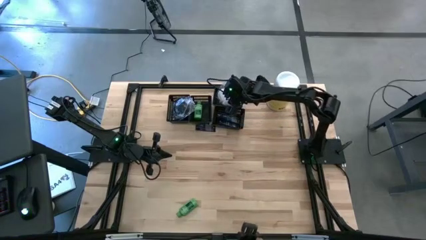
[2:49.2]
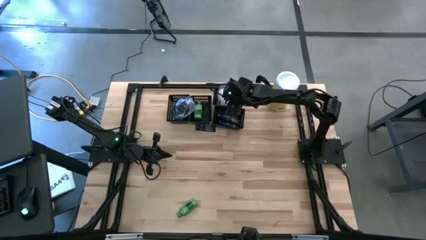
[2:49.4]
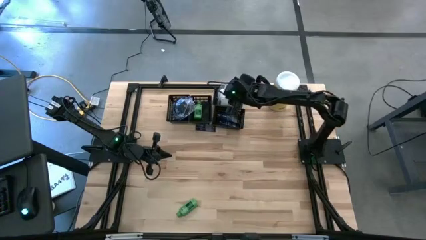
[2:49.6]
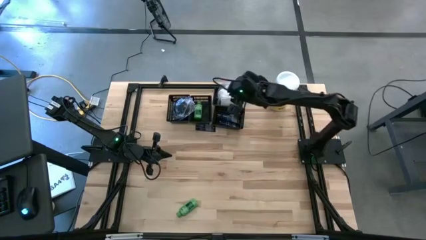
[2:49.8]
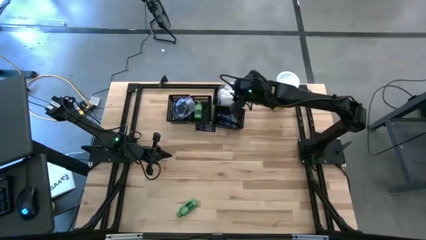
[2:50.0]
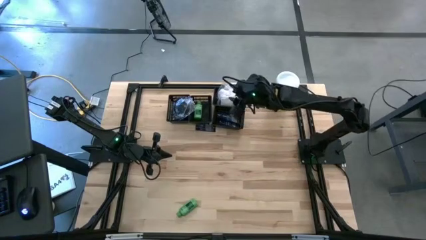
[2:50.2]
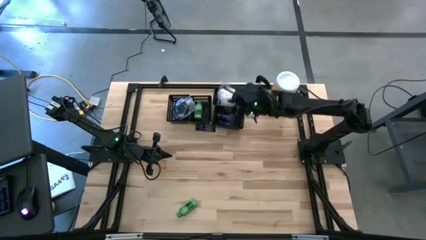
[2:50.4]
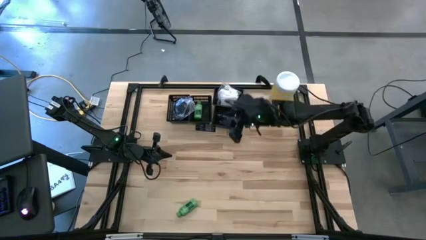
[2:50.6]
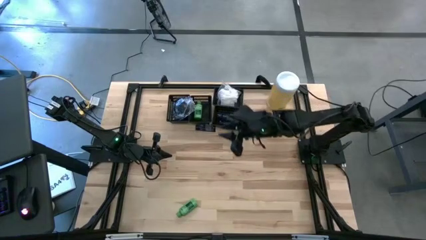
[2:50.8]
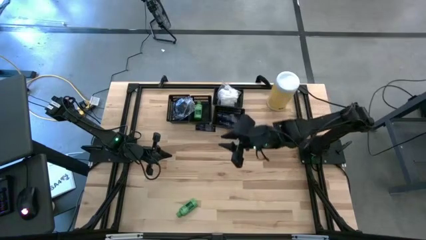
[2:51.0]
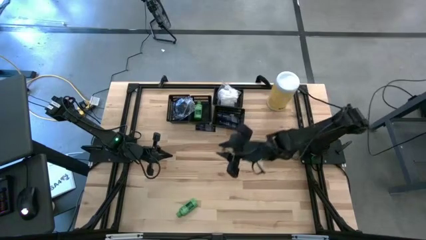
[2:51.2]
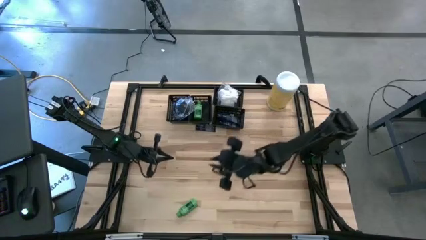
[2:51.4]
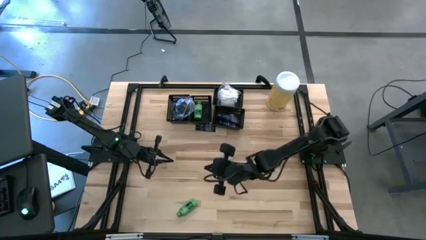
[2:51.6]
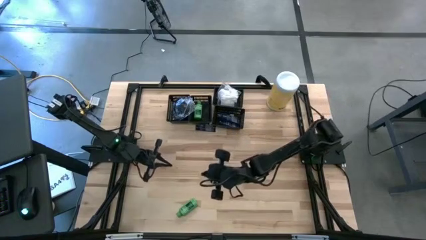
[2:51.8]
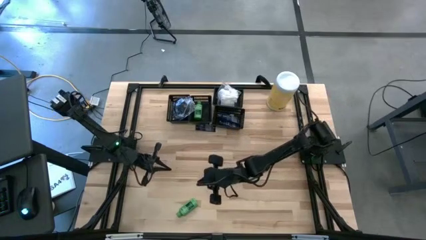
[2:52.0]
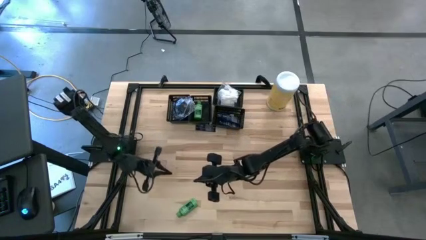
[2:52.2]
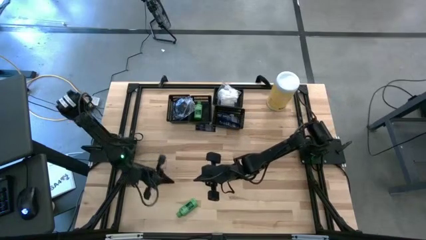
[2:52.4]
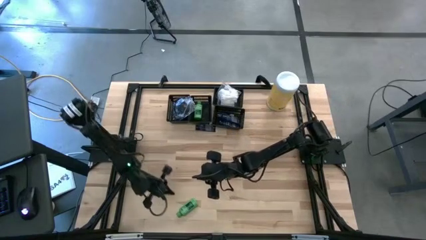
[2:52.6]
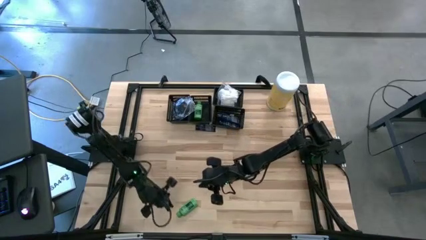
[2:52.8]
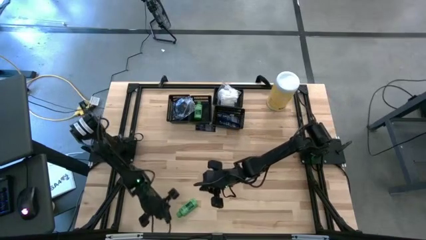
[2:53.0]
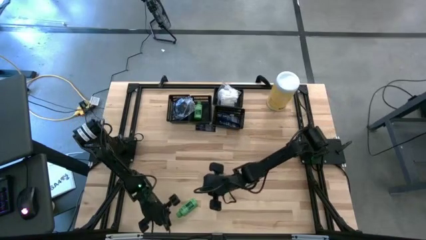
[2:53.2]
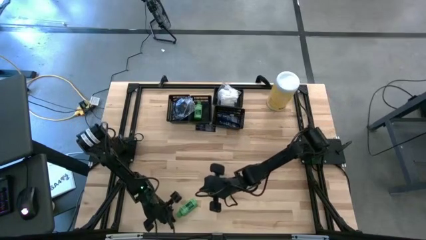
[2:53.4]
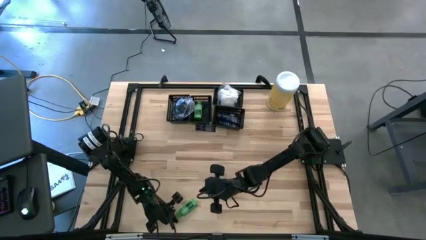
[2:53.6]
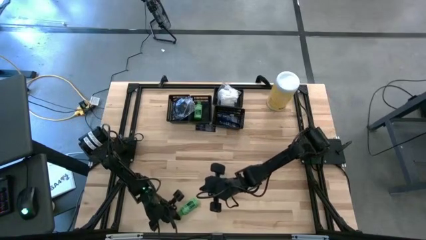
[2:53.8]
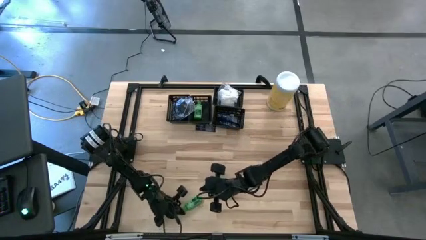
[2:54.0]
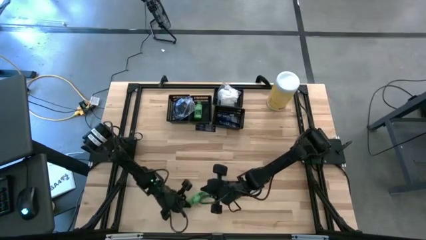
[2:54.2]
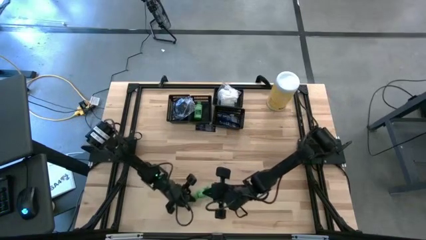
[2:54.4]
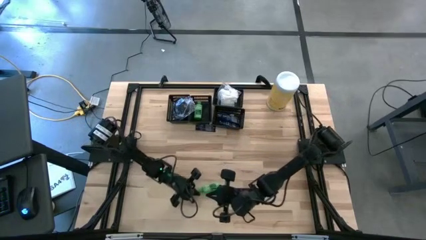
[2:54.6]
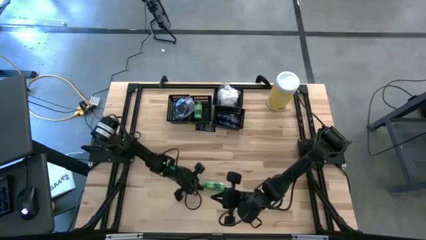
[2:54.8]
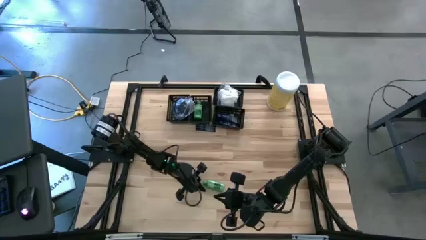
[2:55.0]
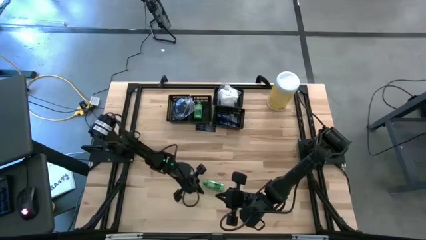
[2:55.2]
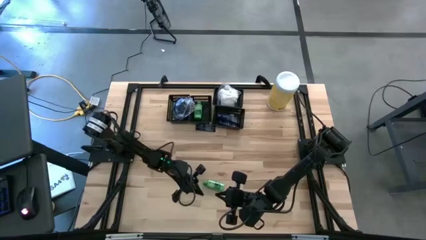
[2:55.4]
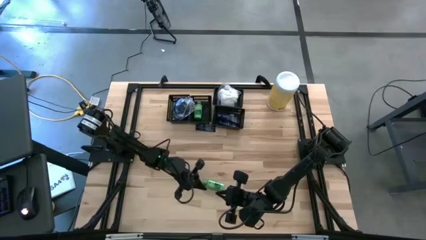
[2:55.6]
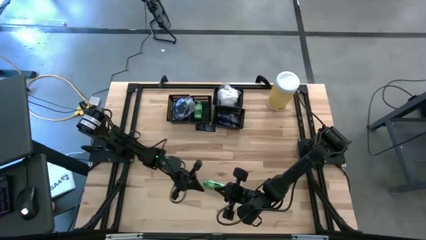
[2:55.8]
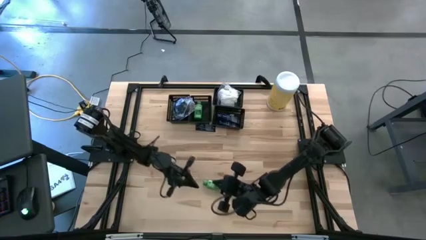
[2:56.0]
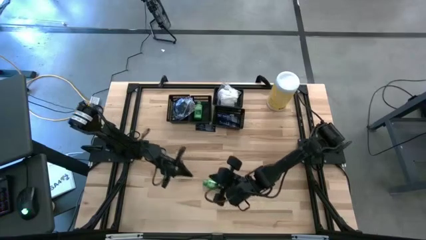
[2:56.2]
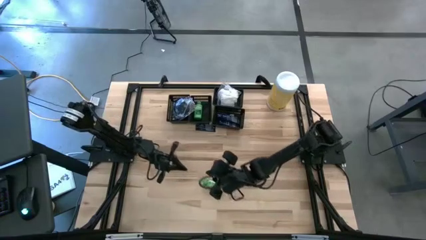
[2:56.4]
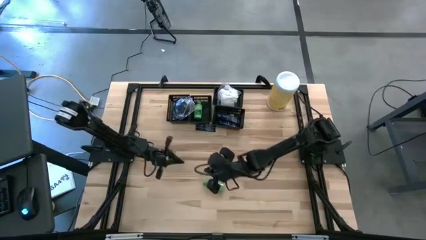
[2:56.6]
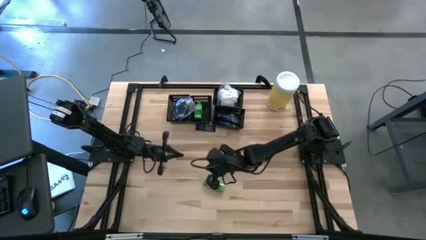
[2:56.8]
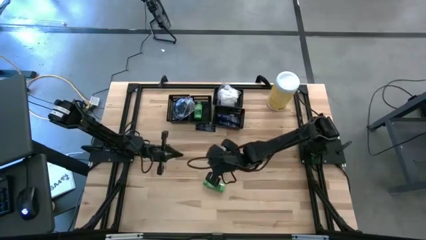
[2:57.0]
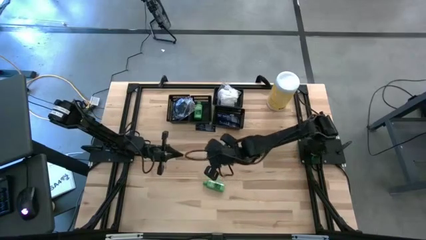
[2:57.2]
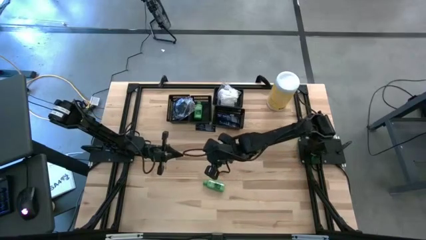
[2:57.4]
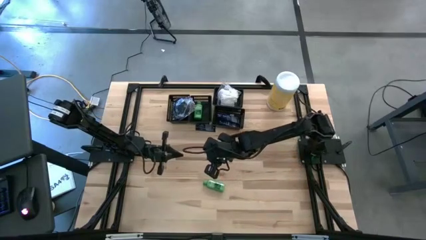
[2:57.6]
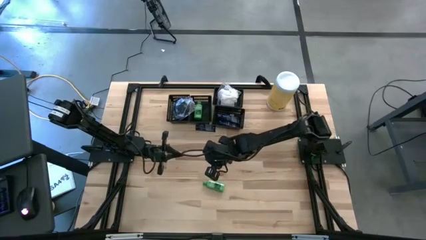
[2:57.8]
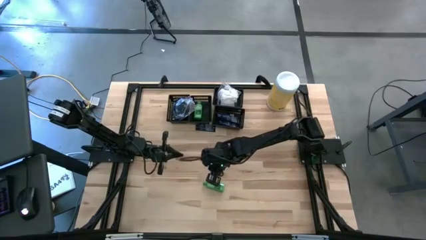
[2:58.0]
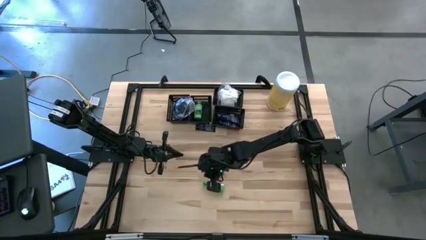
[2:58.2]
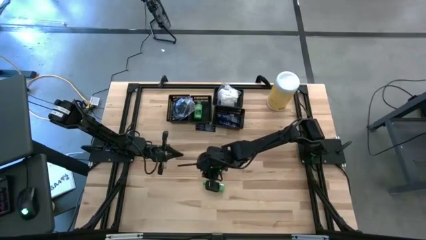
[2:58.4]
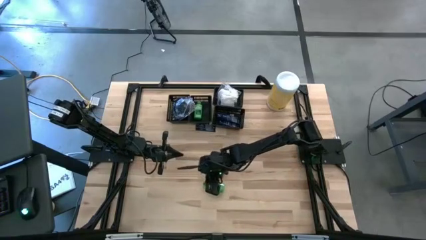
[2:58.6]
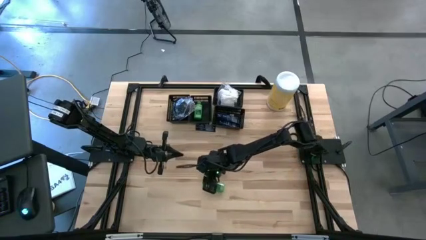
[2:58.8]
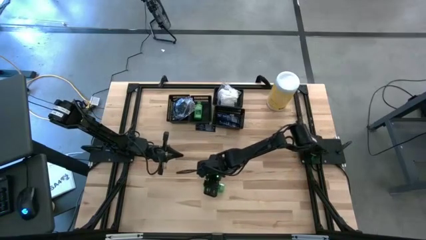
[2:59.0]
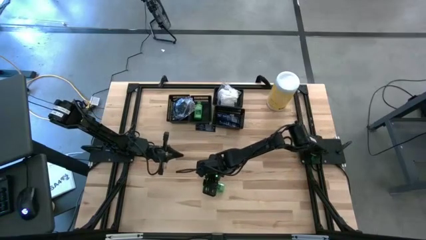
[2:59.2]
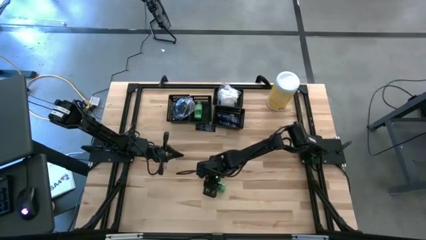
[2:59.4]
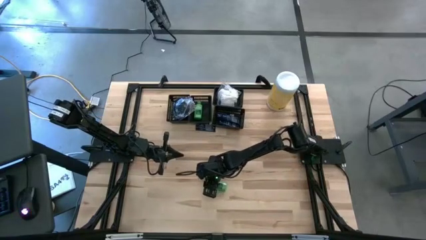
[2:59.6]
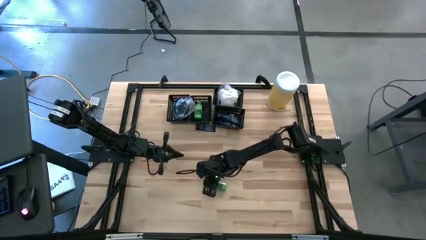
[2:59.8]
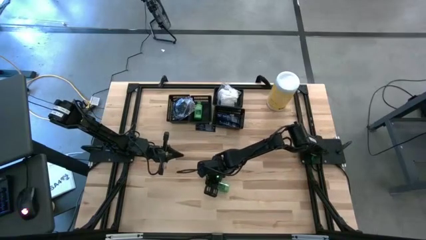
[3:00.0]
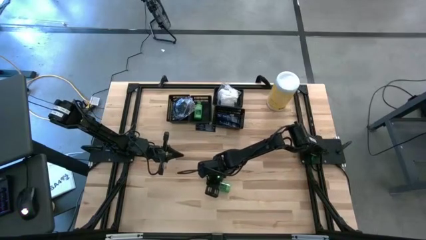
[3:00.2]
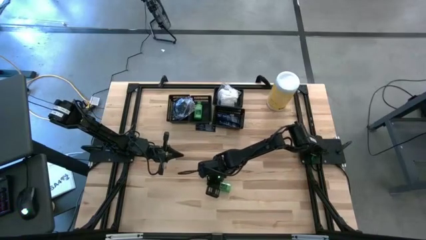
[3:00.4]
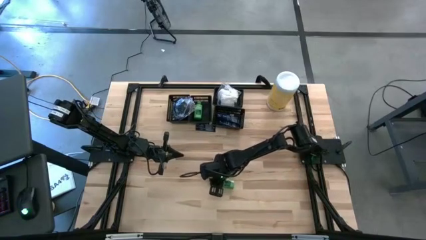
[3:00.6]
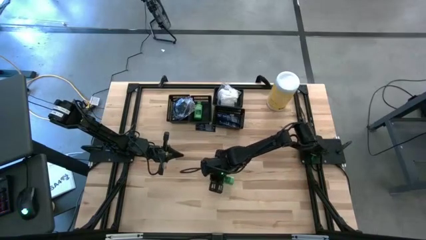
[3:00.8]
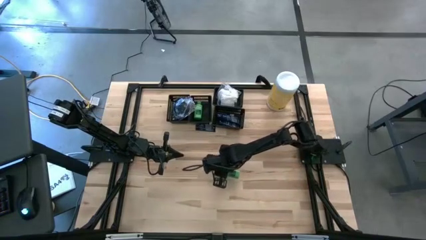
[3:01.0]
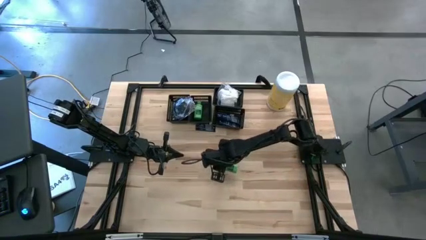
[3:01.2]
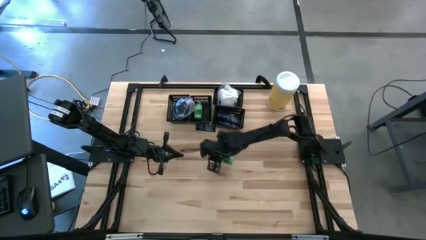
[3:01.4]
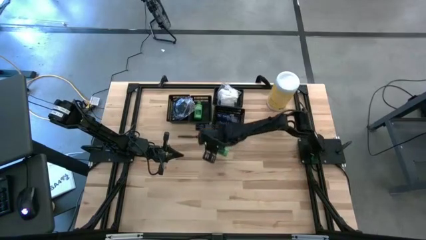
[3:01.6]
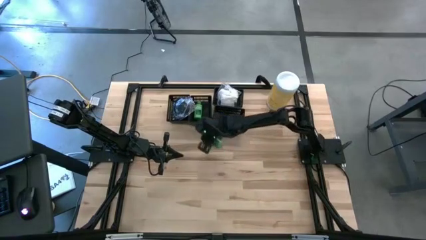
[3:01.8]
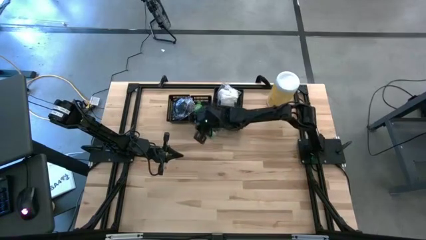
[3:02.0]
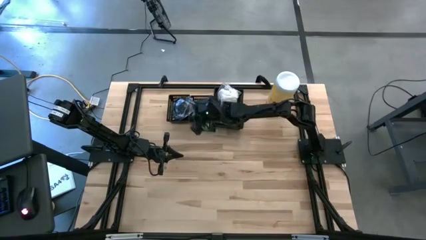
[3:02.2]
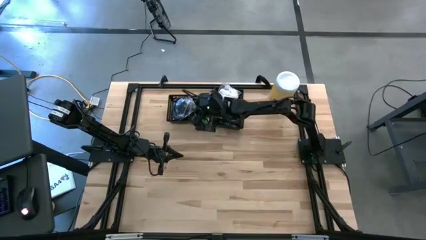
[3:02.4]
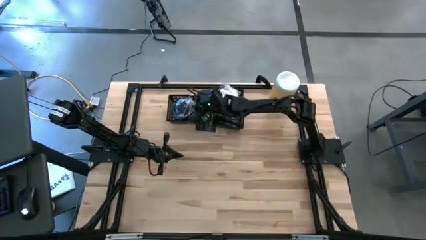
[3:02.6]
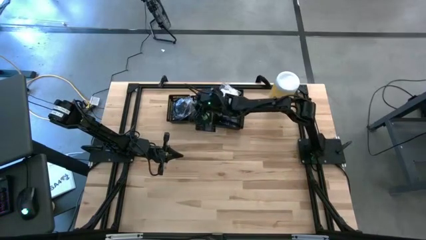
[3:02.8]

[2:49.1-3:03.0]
Task: Pick & Place Travel size toiletries
Put the green shampoo bottle into the right black bin
